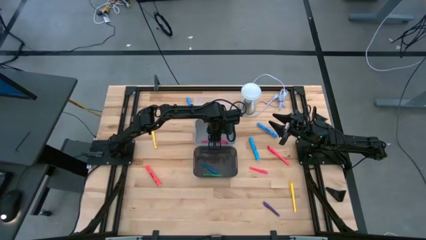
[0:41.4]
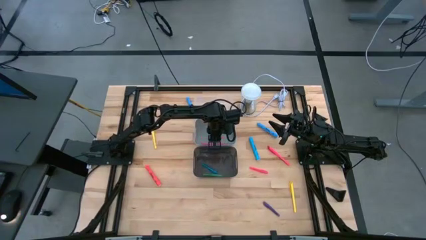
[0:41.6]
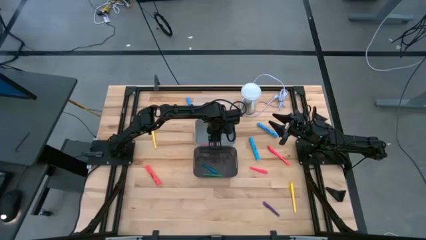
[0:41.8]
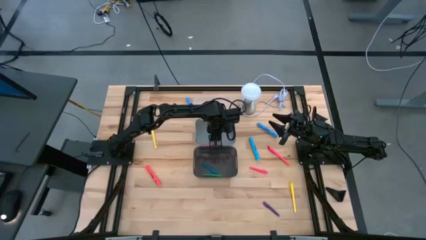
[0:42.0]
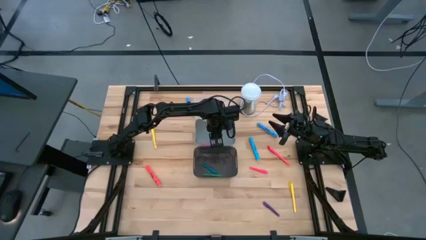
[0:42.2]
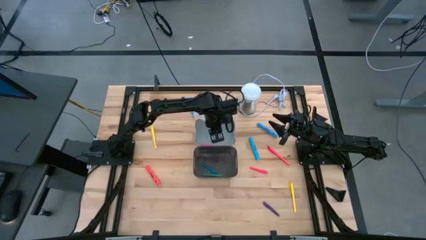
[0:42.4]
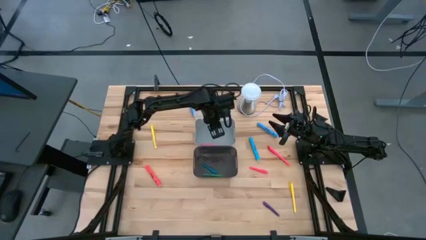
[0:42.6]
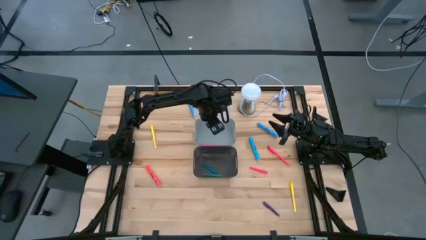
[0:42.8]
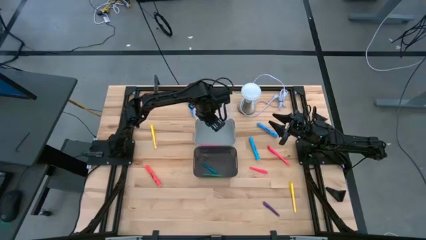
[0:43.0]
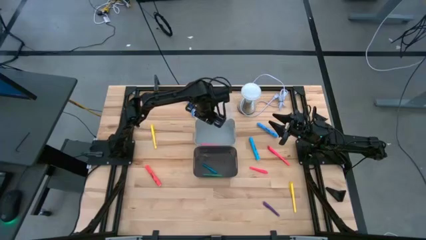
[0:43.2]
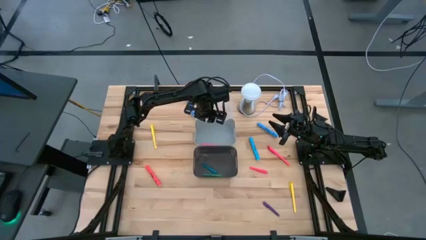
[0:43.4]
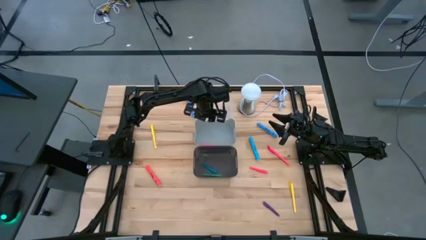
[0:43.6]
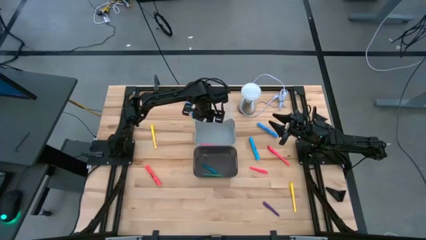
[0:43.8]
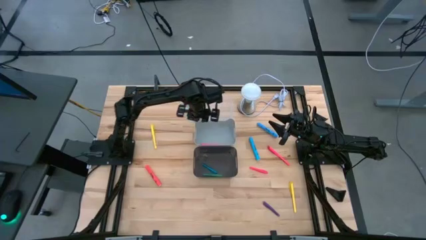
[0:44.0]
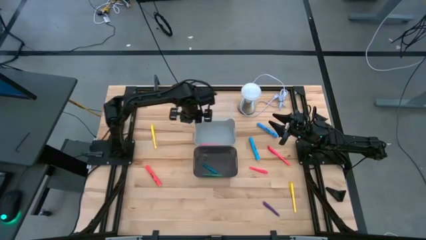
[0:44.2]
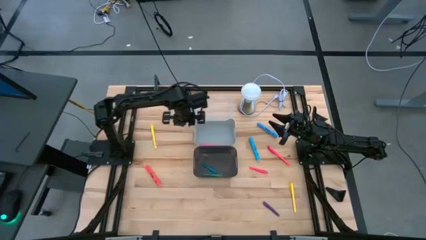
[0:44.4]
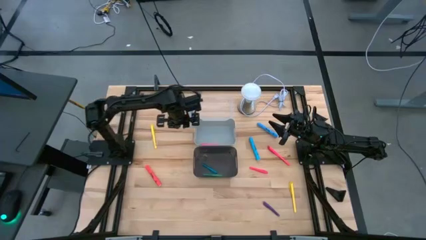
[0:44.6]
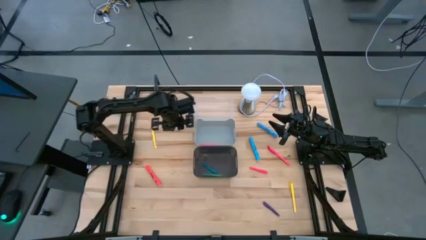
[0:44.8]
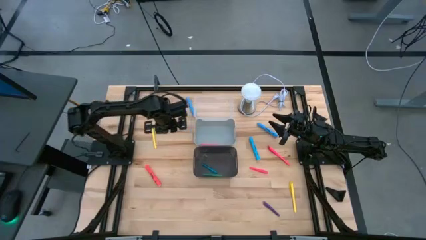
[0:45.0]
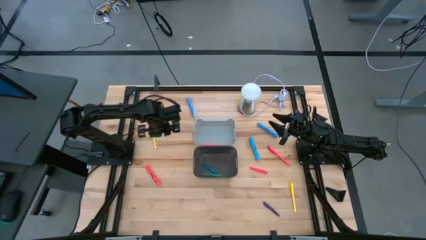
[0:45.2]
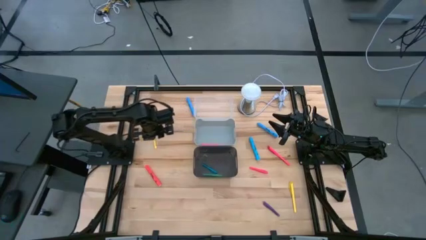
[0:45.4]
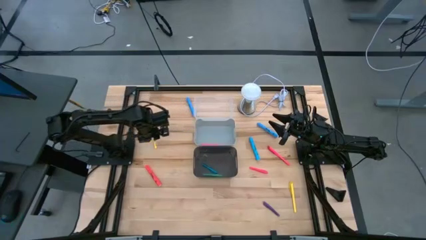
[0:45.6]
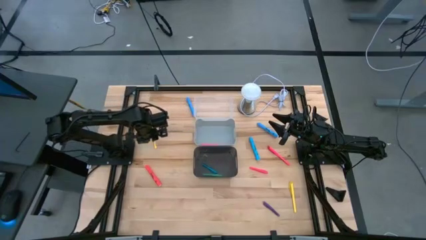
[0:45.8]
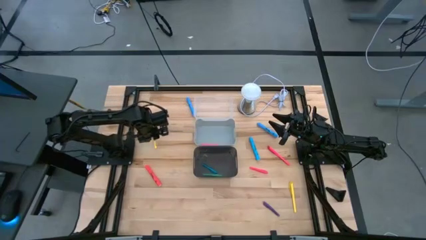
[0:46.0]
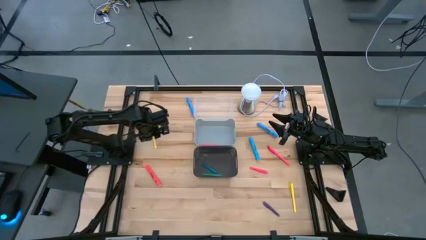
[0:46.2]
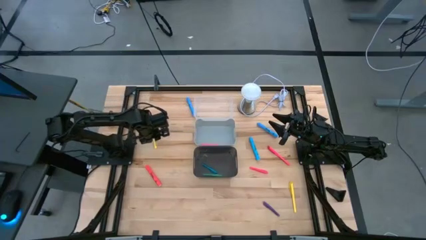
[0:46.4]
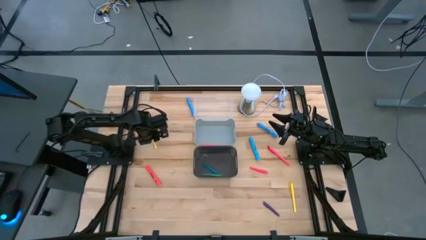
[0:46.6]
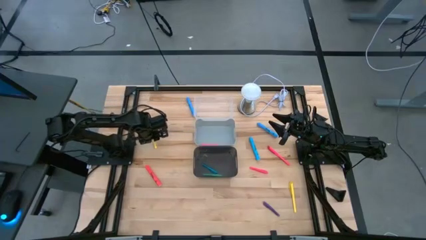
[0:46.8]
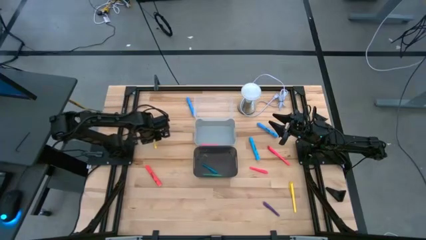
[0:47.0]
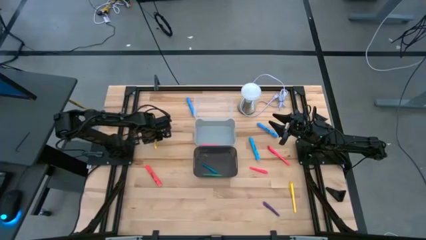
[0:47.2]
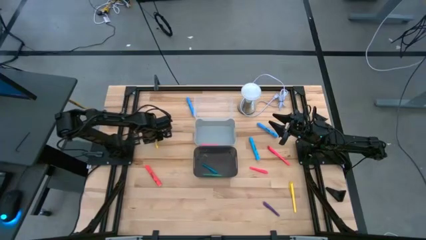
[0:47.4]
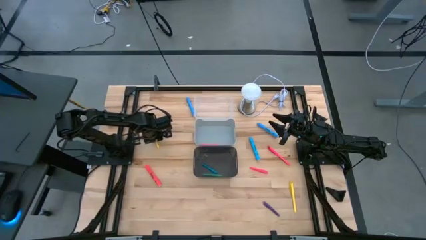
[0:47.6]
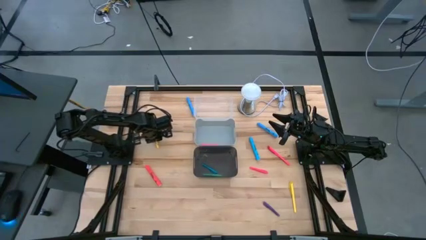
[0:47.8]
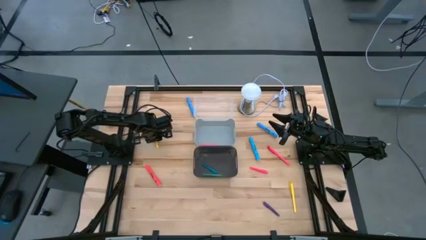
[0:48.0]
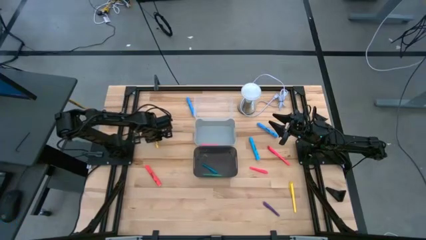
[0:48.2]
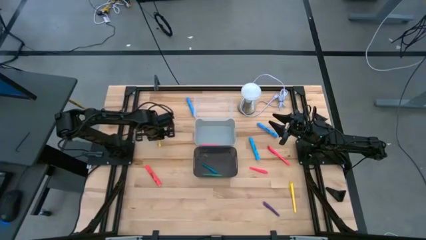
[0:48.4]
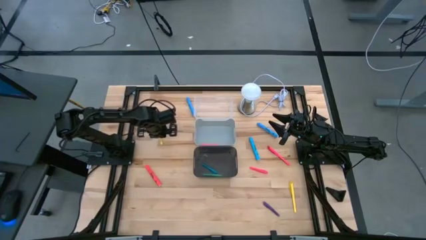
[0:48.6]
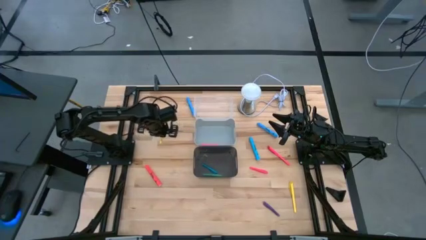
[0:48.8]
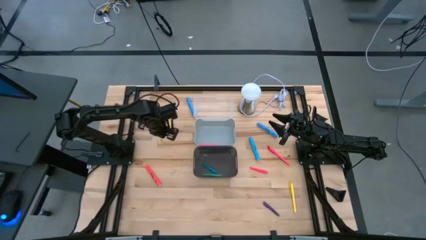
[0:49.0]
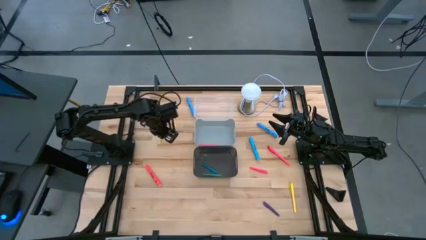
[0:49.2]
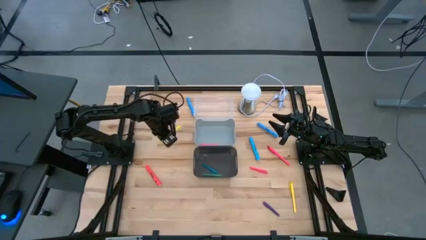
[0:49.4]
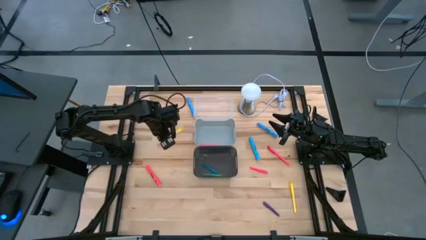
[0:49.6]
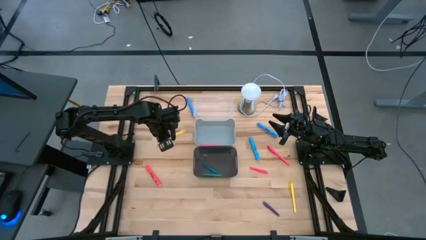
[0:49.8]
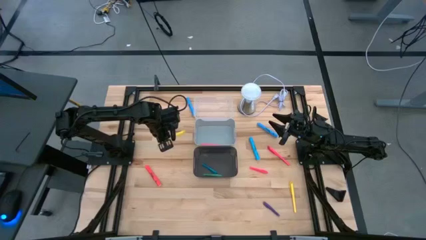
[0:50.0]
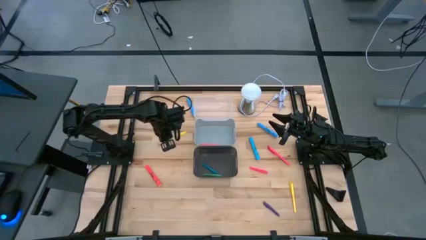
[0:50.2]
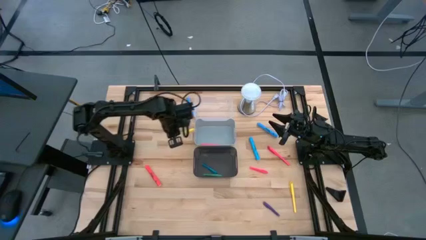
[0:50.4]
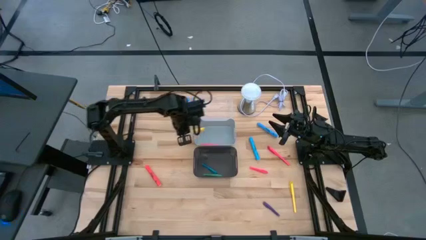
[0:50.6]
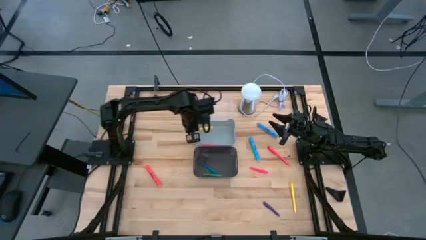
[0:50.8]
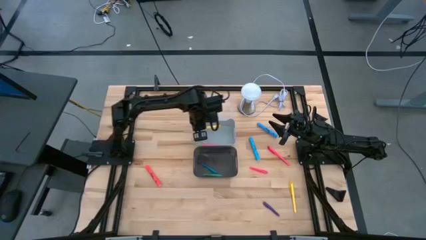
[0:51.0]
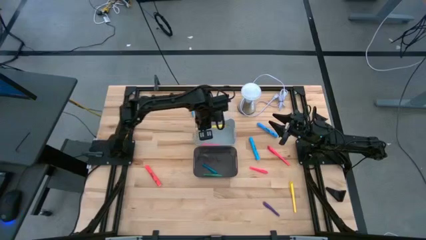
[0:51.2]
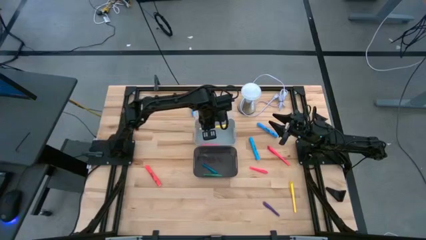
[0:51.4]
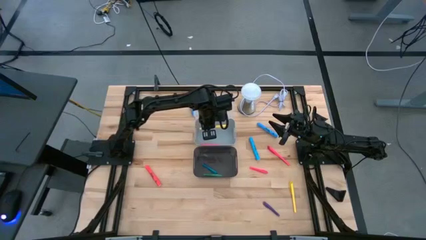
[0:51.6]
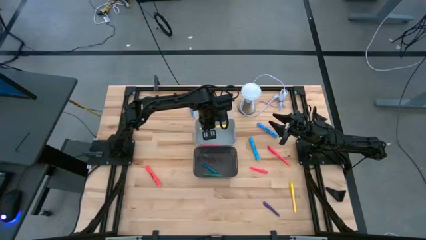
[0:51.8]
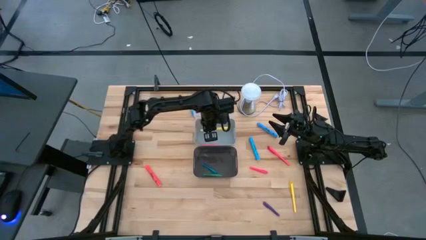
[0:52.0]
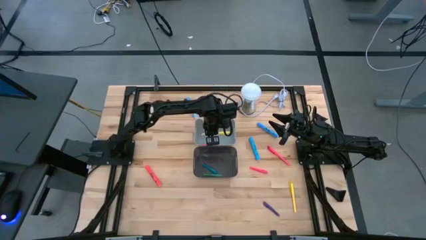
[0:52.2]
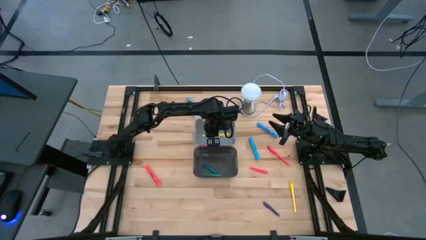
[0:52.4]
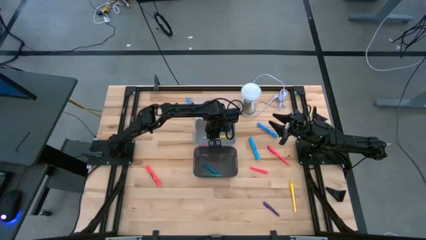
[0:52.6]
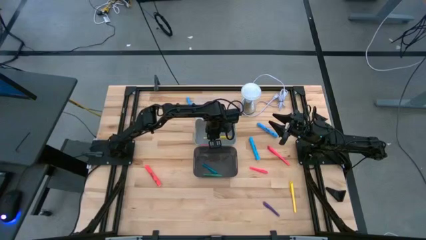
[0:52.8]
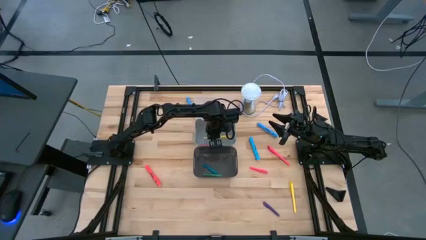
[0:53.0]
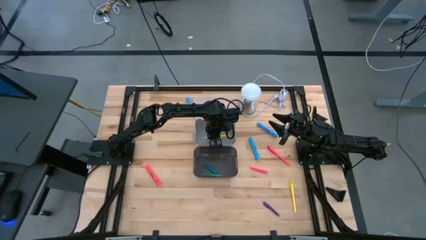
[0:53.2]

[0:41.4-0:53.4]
Task: Pick & Place Markers
Put the yellow marker into the transparent bin

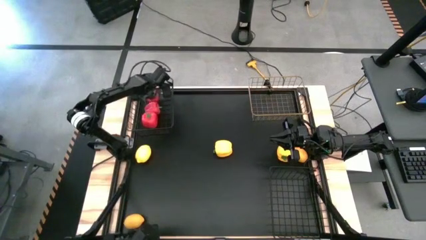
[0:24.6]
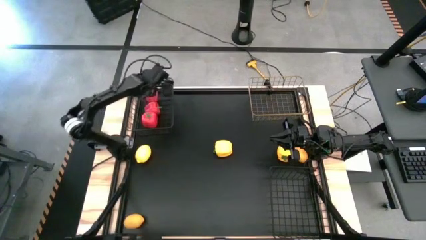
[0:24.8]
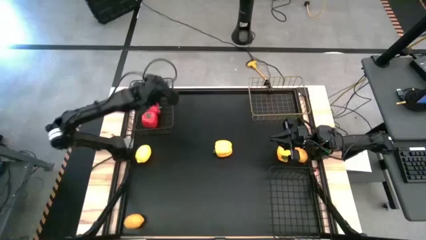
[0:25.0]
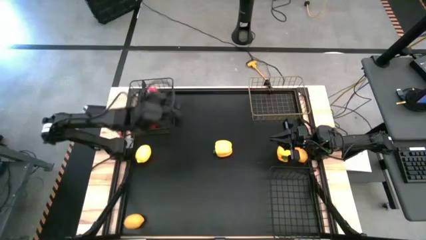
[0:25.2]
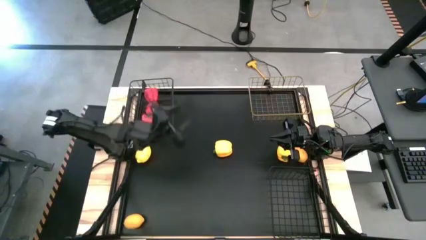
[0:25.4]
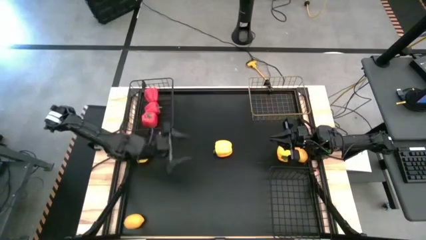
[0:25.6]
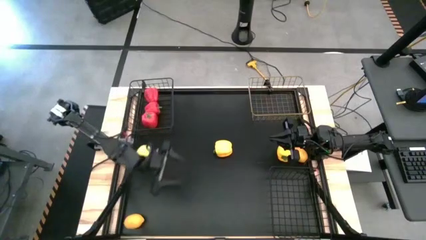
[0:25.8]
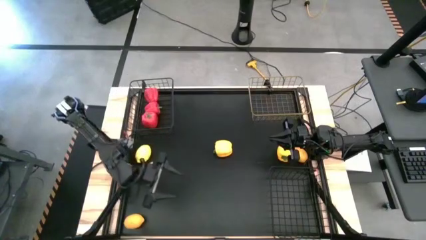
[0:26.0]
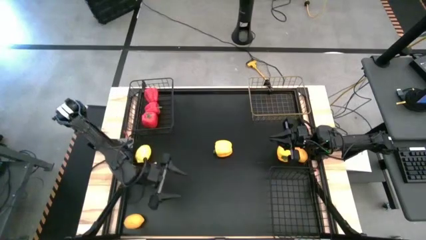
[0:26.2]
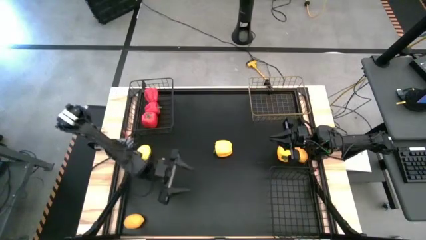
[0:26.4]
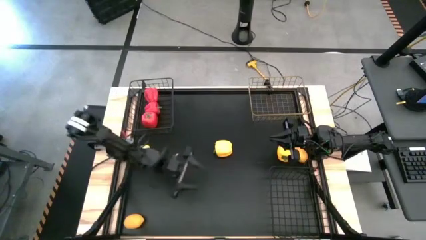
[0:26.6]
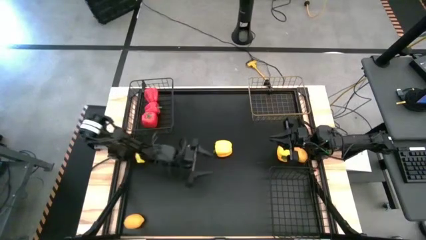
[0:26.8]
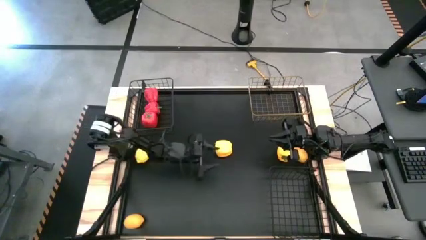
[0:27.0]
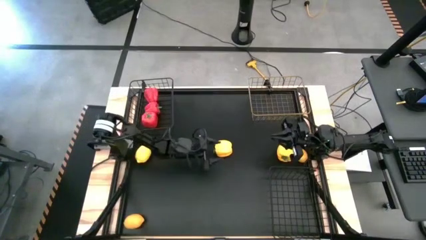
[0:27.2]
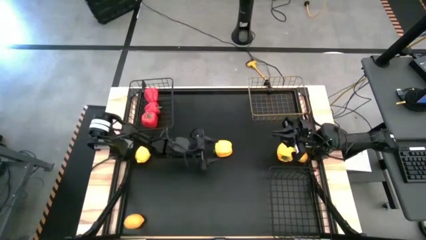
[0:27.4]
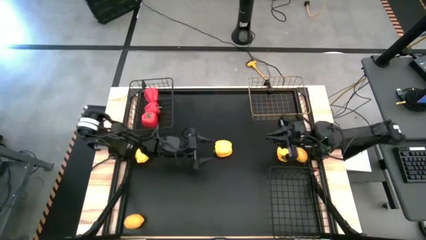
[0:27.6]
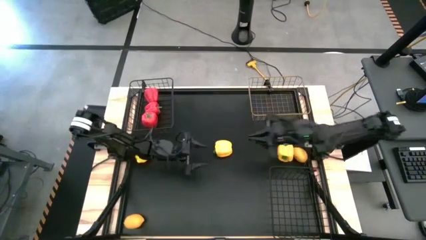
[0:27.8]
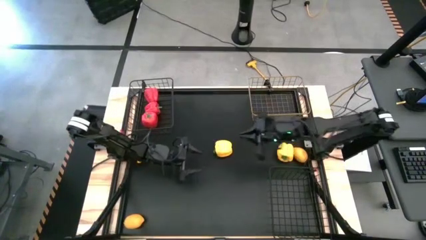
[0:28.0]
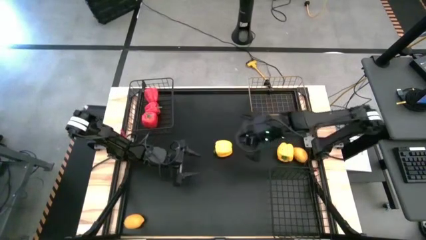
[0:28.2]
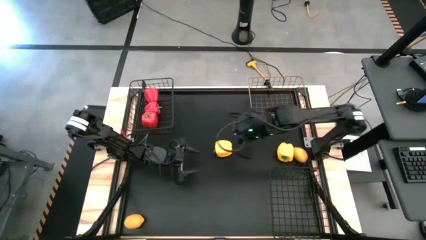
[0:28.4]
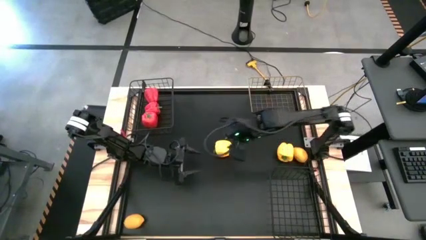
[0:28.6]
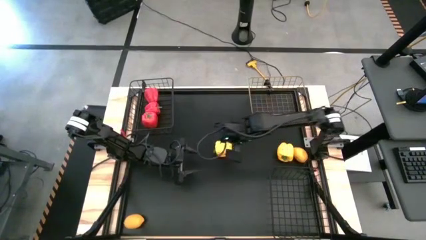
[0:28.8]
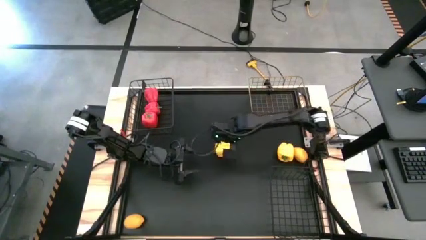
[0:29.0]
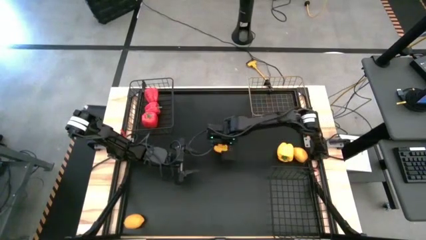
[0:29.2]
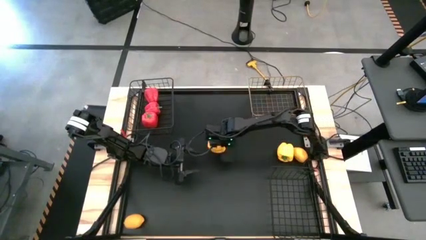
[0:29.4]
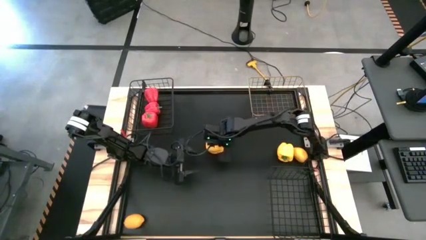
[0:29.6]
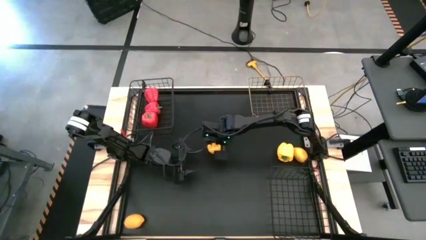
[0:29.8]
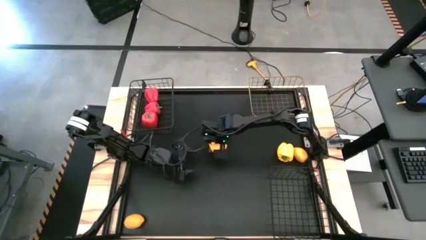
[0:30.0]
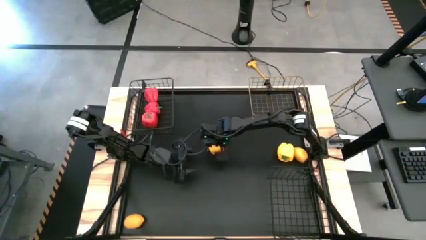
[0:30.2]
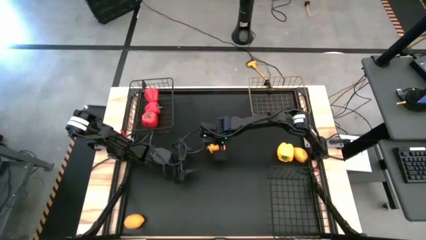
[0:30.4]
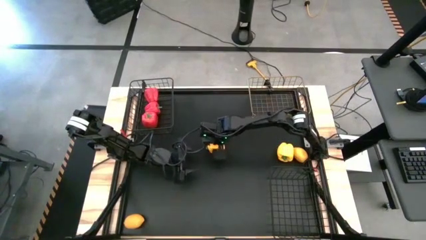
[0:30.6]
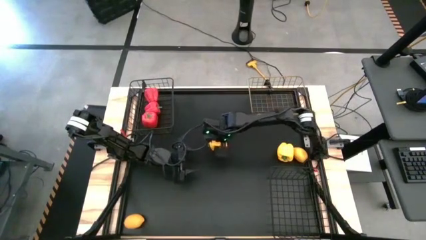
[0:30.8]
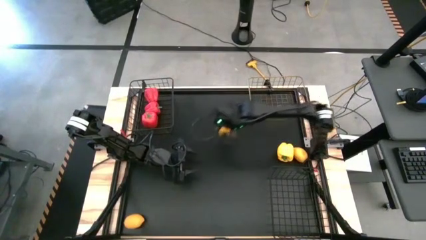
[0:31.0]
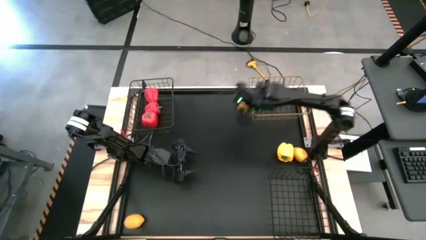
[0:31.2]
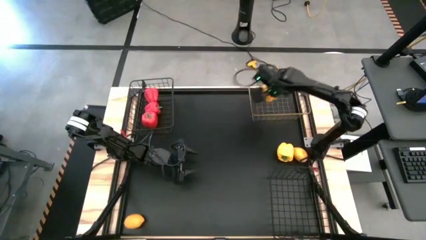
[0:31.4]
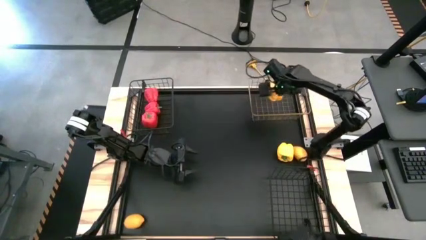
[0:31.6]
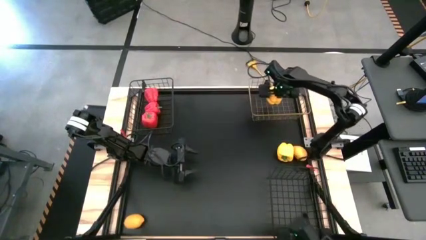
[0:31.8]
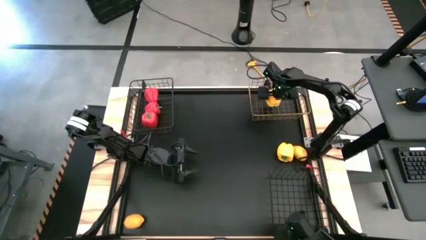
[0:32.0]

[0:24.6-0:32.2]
Task: Sort produce into baskets
Put the left yellow bell pepper into the gold mesh basket
